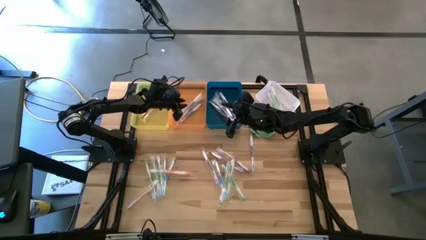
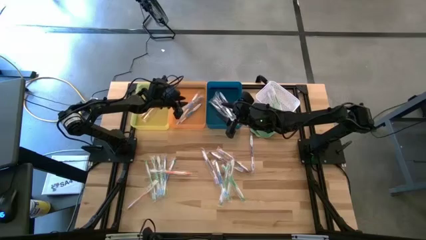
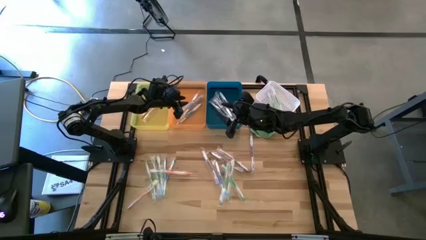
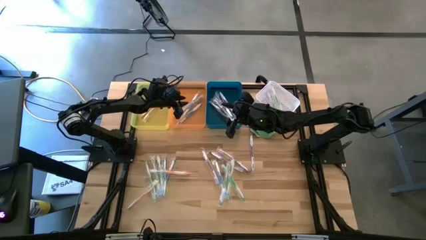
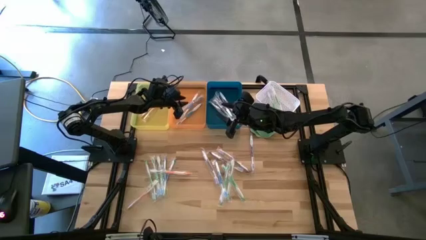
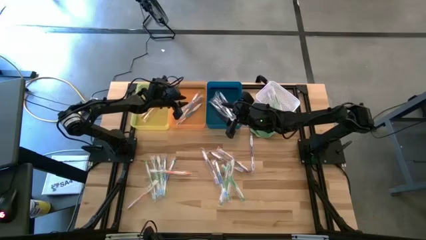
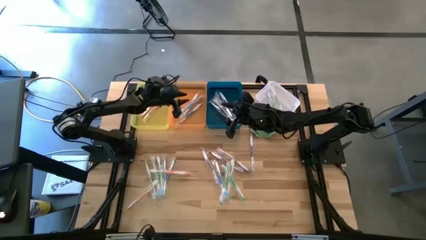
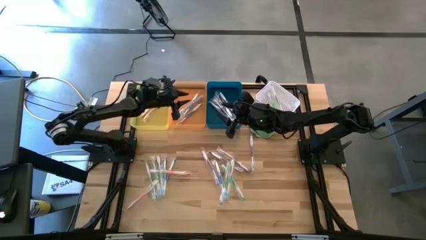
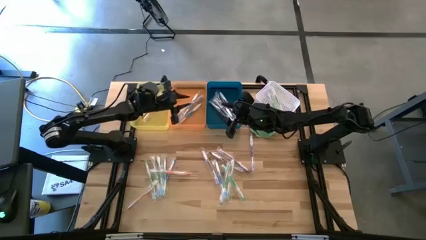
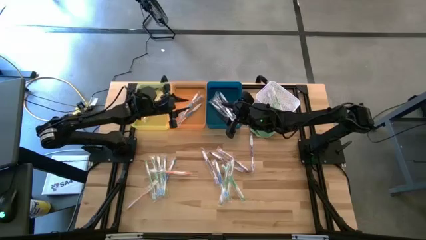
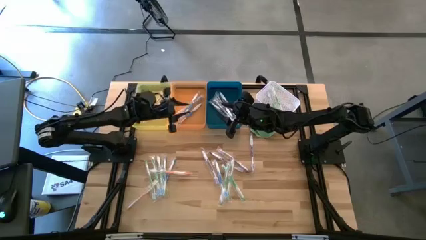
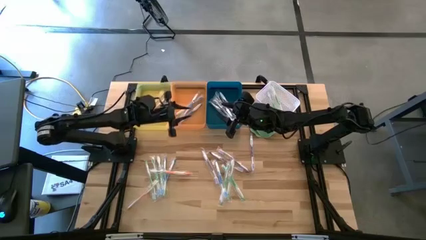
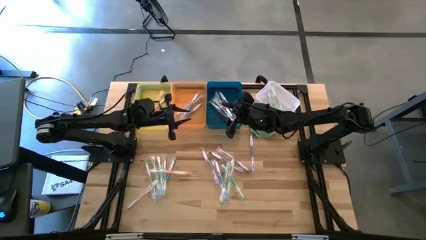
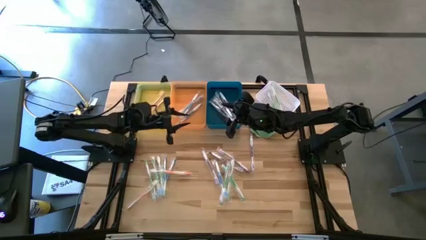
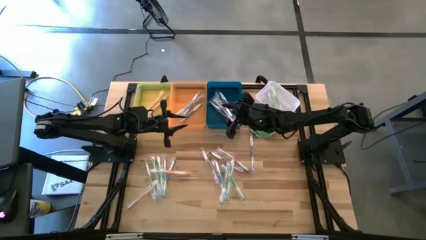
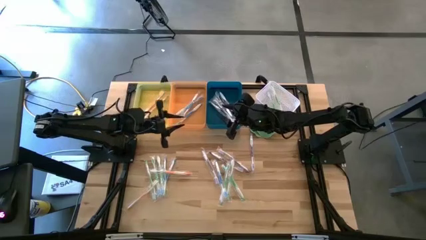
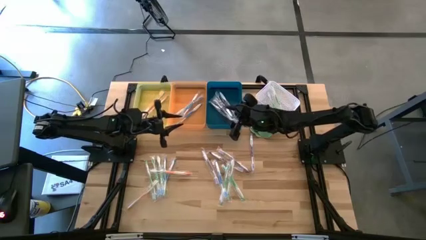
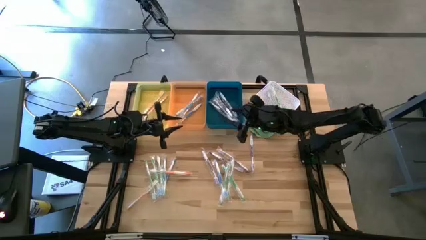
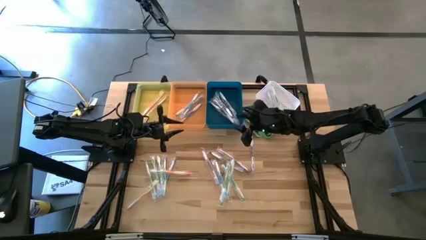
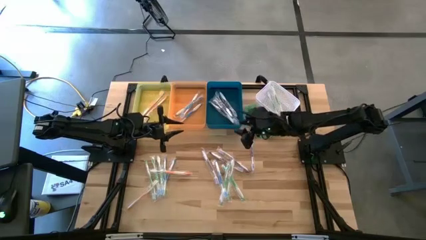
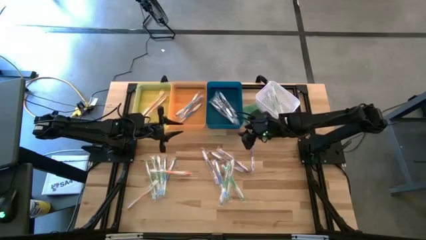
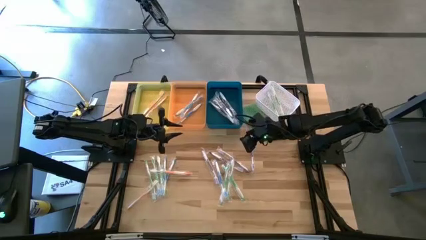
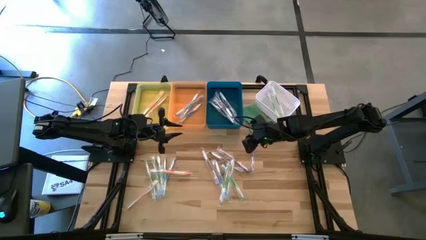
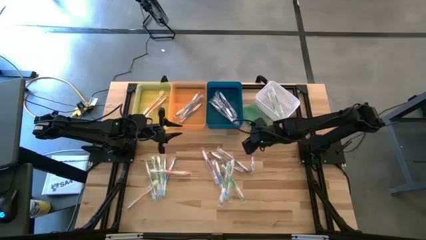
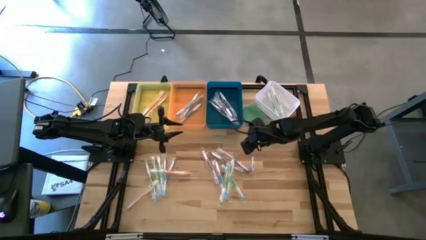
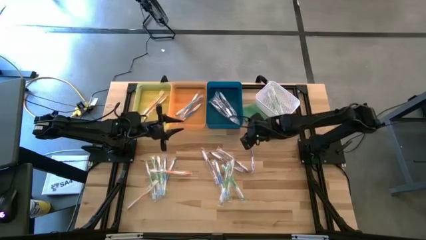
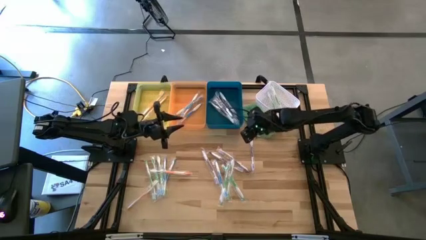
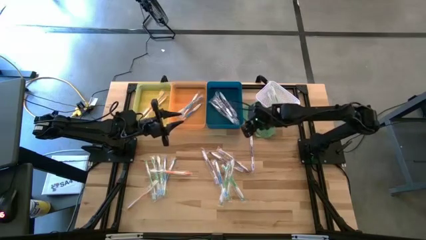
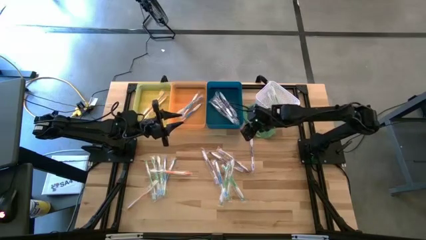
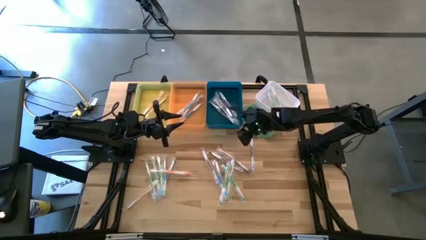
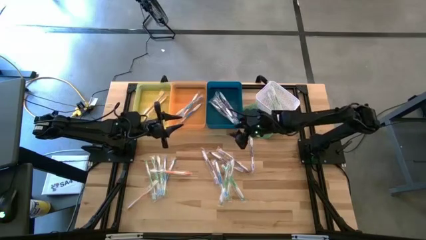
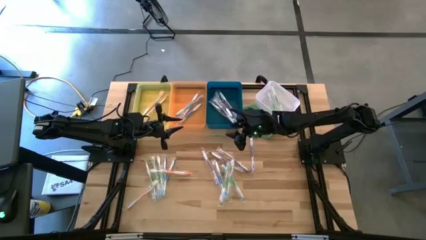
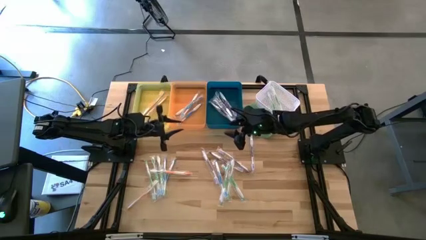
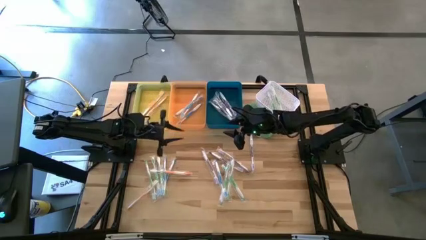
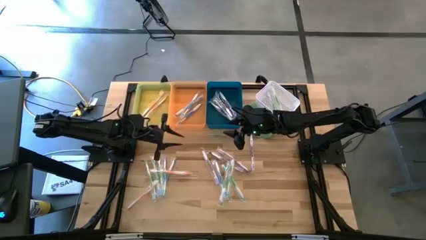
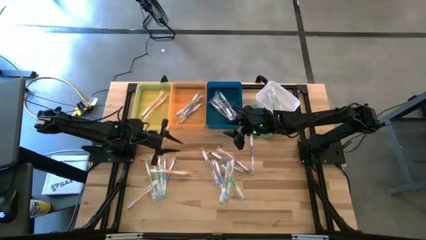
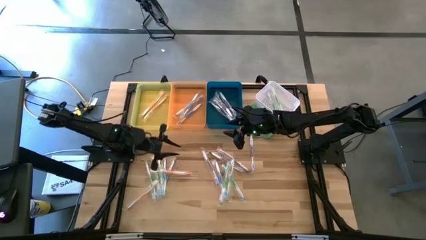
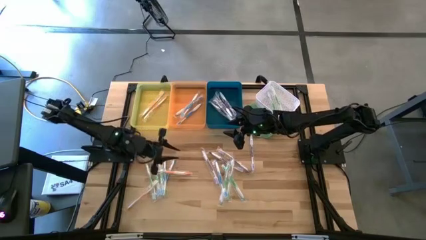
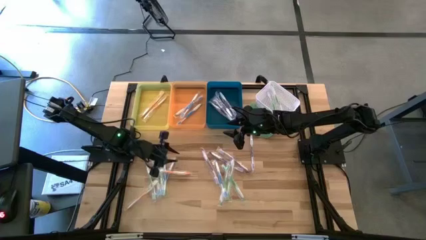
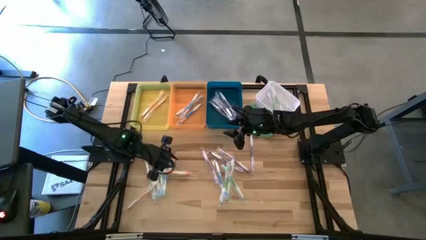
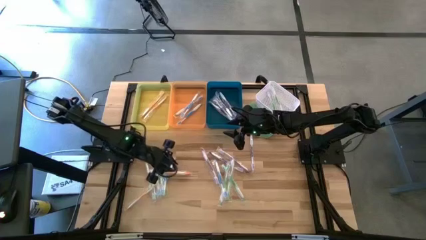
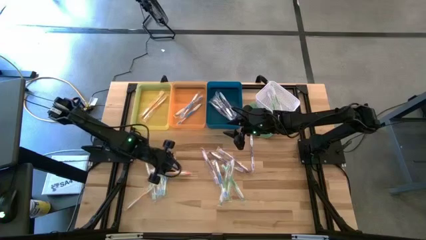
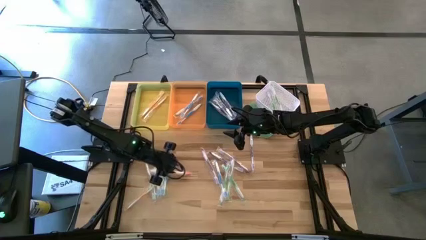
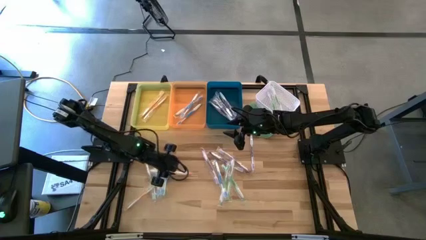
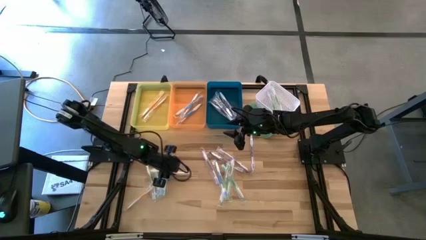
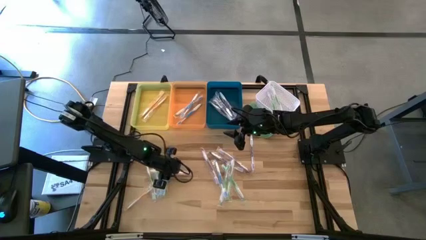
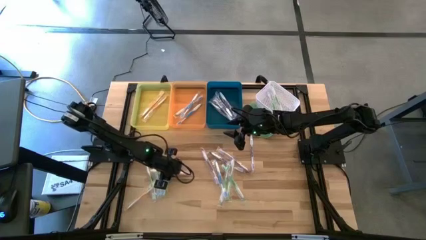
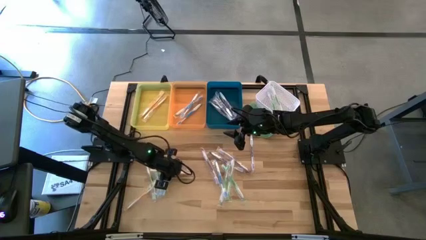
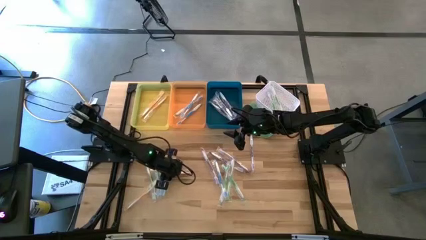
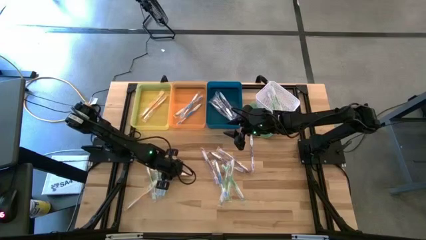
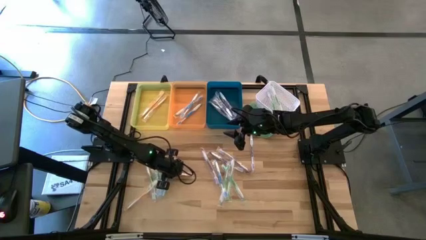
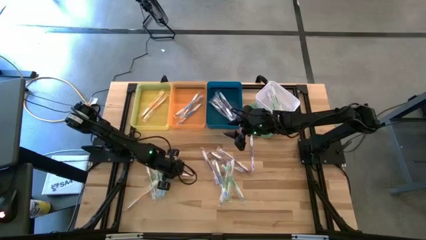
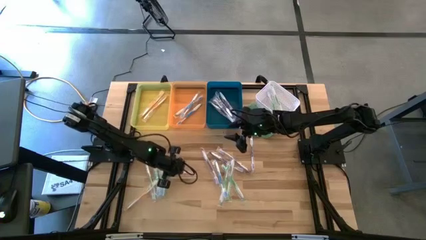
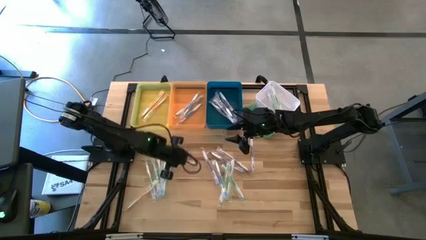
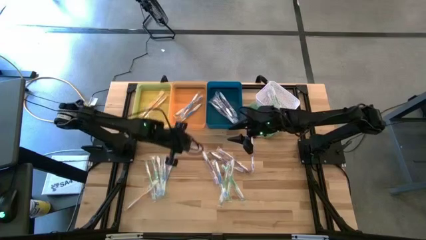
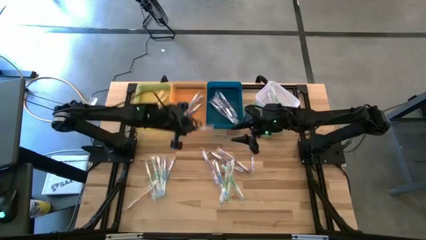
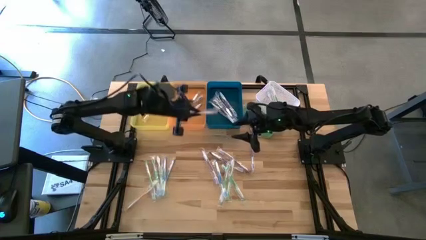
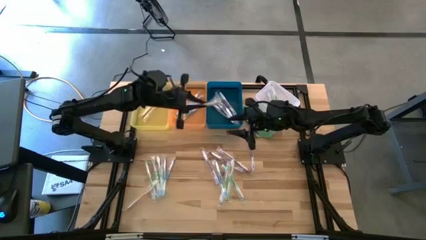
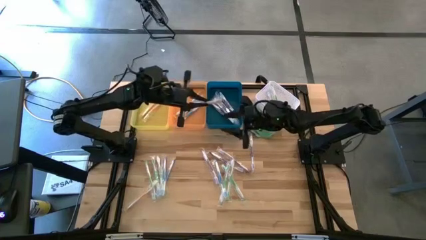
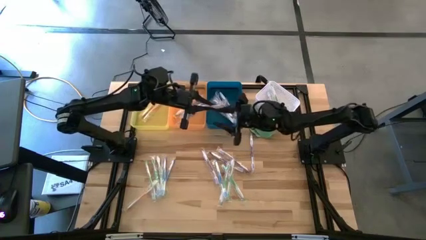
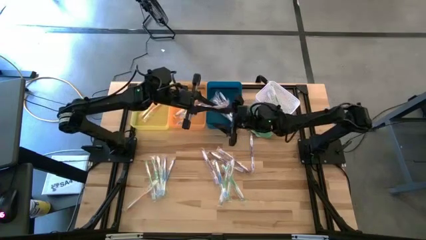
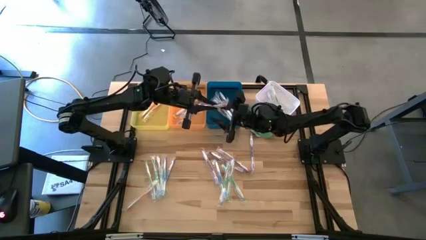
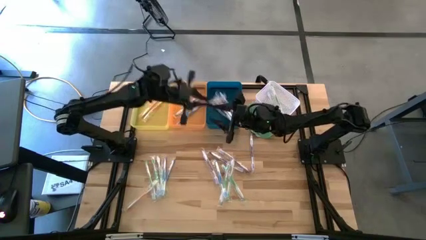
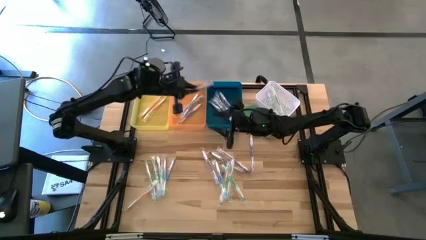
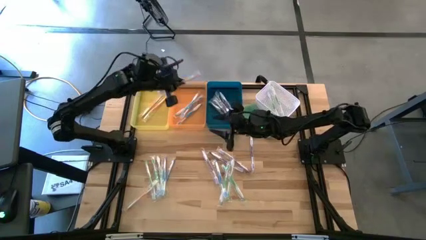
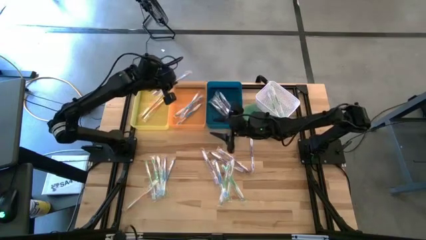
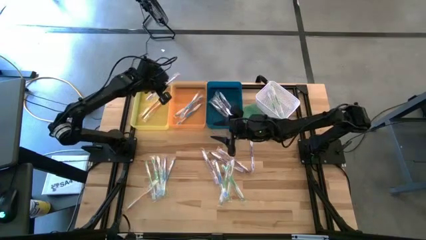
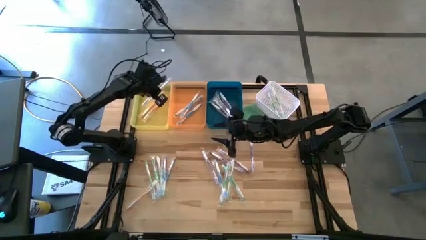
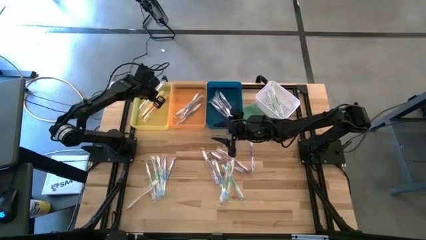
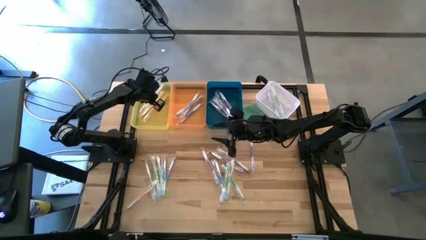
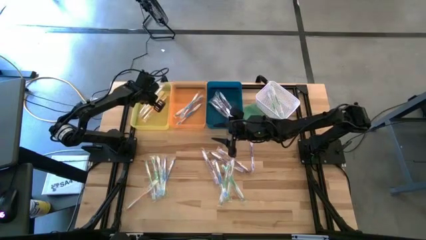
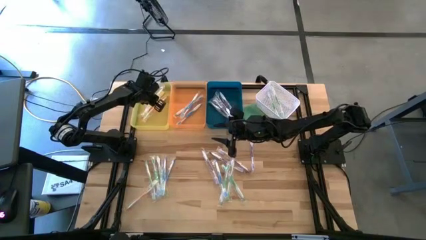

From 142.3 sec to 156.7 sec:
Task: Pick & Place Toothbrushes
Put the yellow toothbrush into the yellow bin
